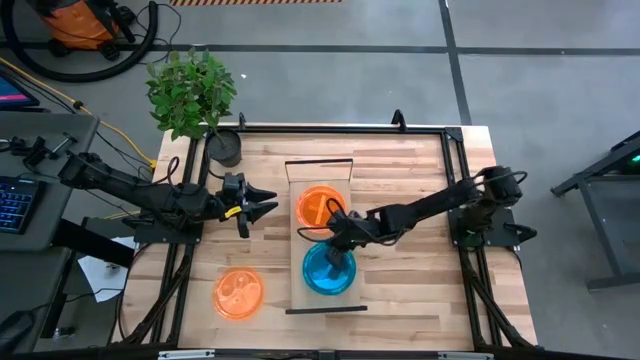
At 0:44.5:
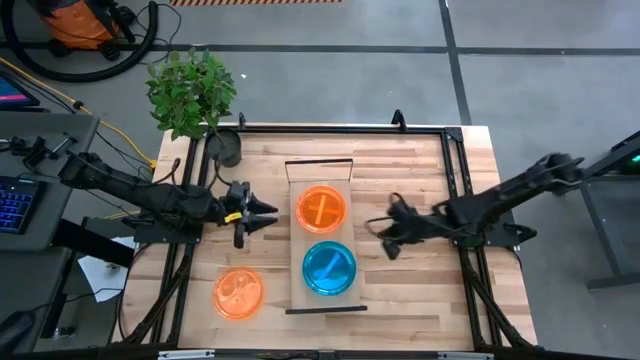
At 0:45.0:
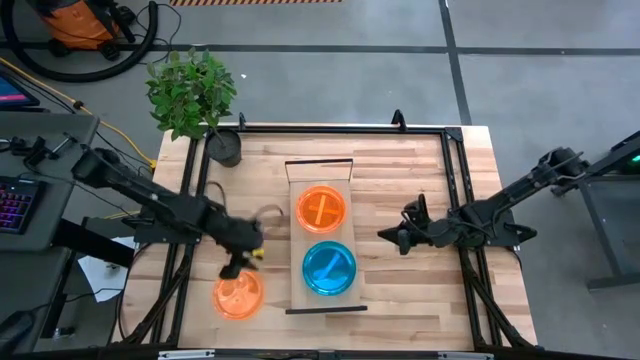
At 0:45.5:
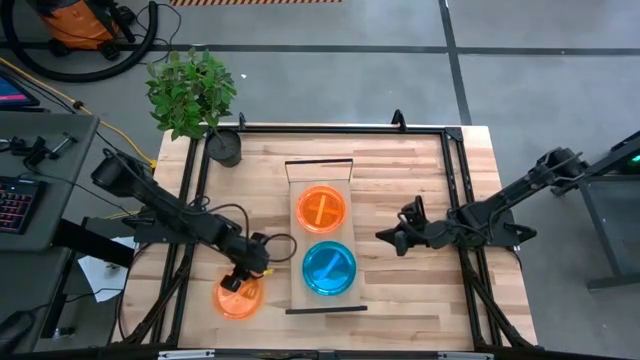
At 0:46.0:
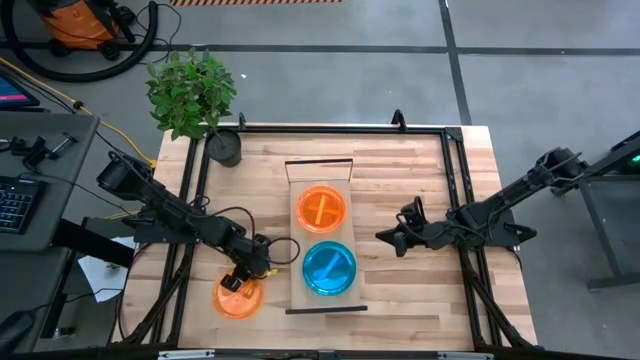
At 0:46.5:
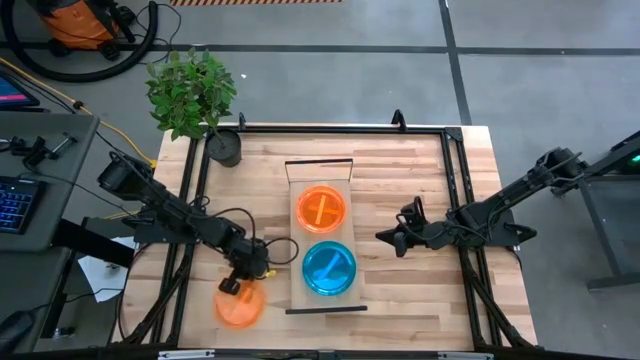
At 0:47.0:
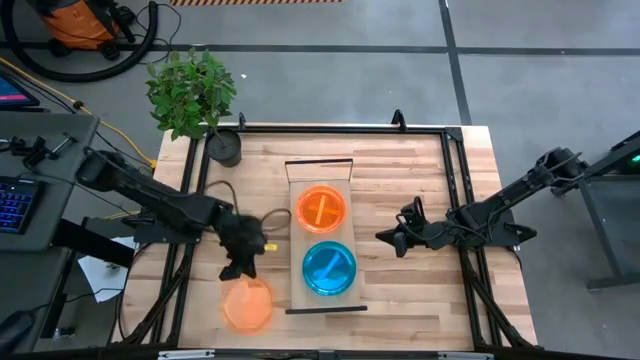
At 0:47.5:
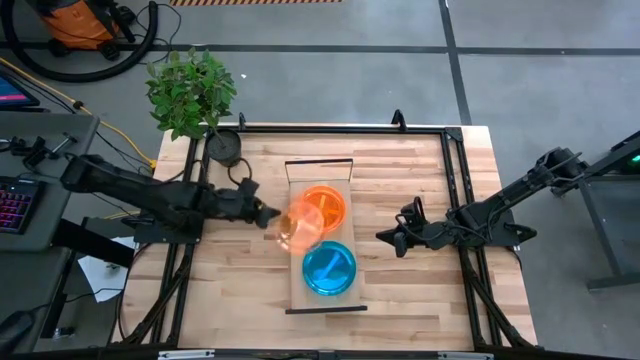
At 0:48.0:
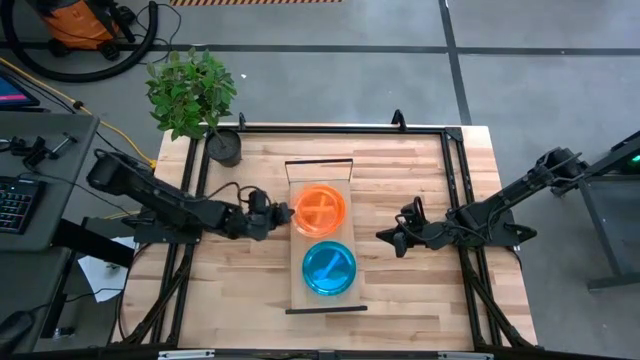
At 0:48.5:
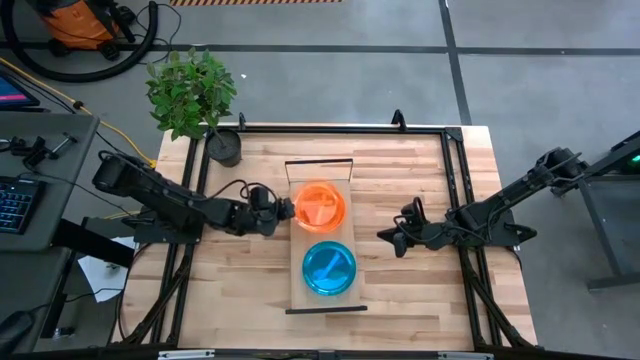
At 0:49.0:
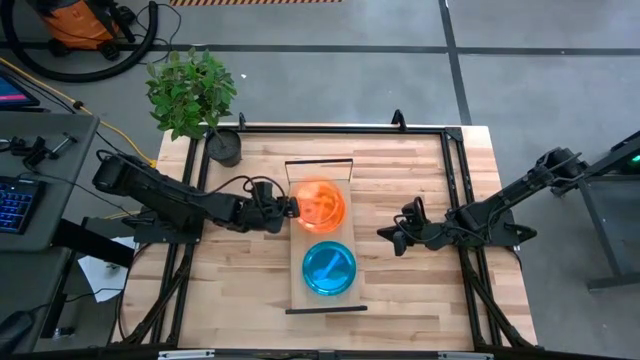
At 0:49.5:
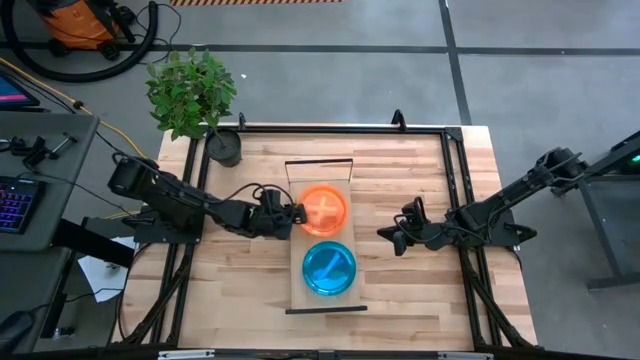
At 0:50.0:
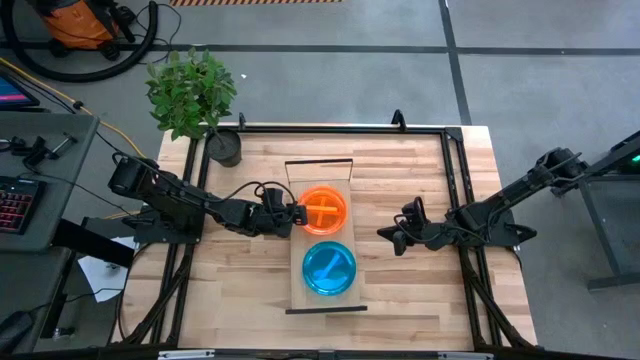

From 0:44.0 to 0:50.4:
Task: Place and stack plates onto a shelf
Stack the orange plate on the orange transparent plate

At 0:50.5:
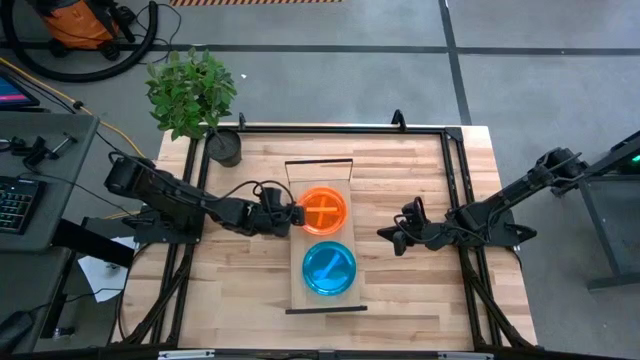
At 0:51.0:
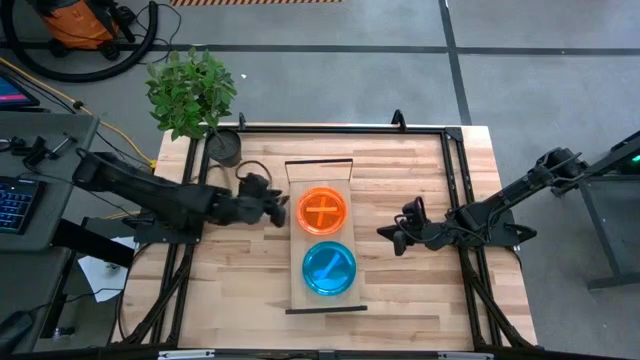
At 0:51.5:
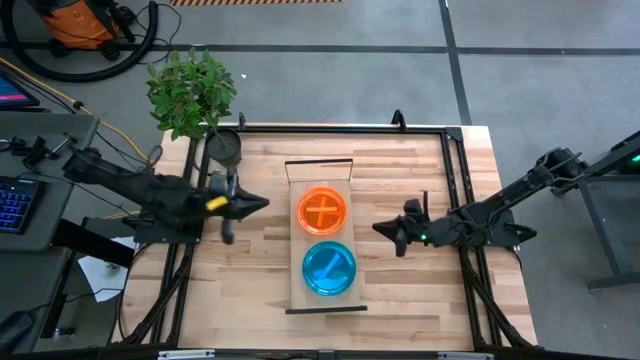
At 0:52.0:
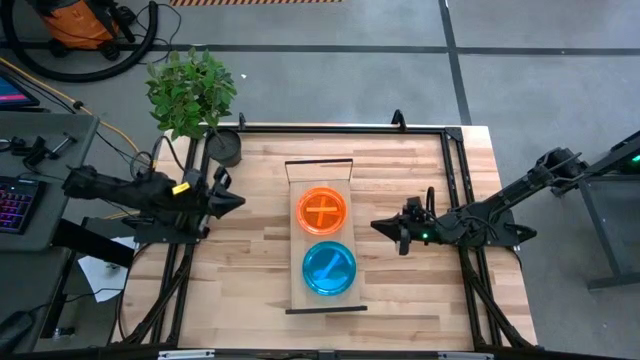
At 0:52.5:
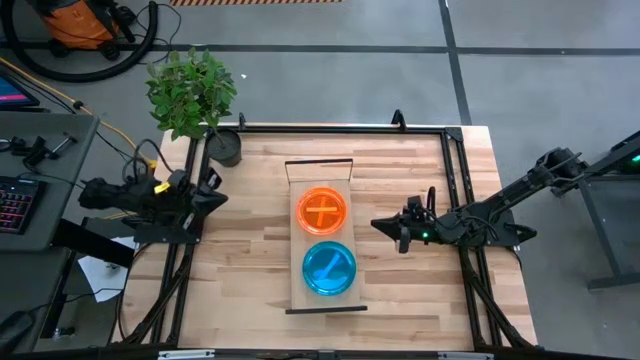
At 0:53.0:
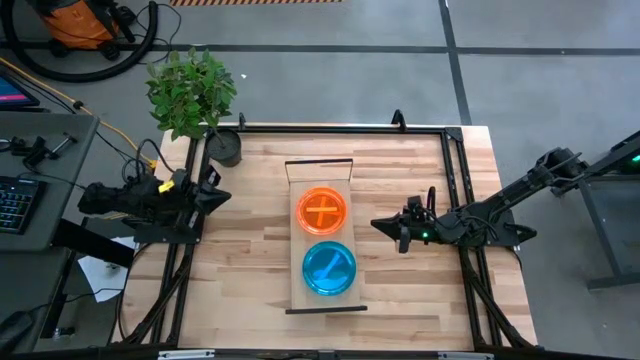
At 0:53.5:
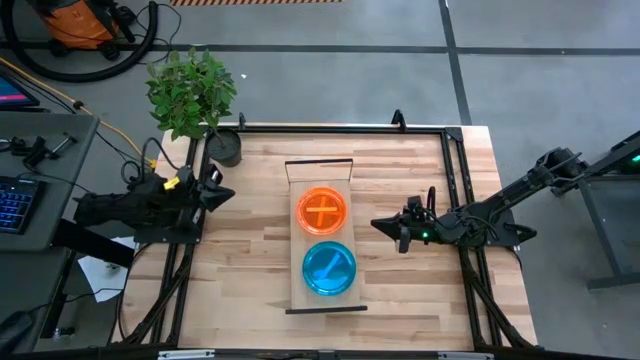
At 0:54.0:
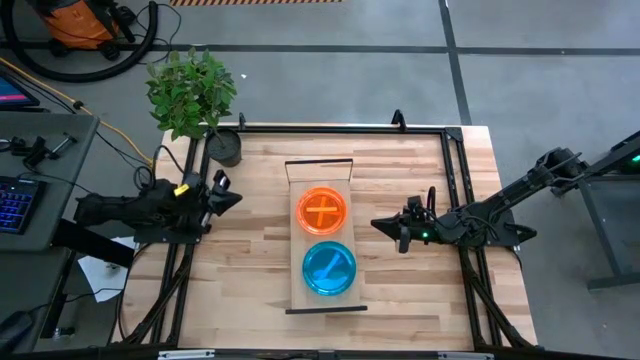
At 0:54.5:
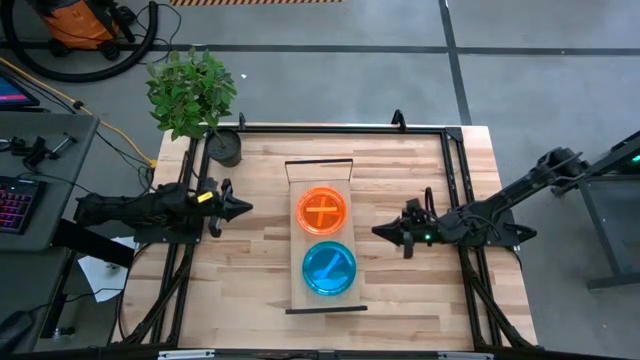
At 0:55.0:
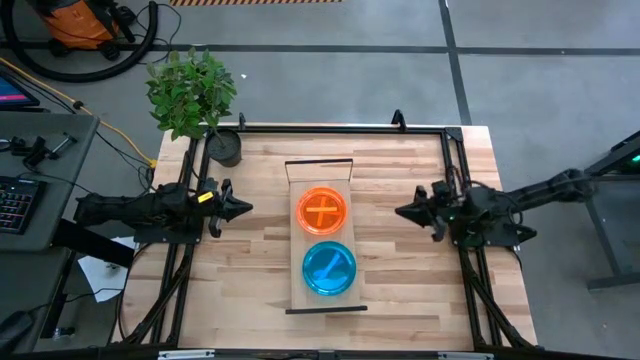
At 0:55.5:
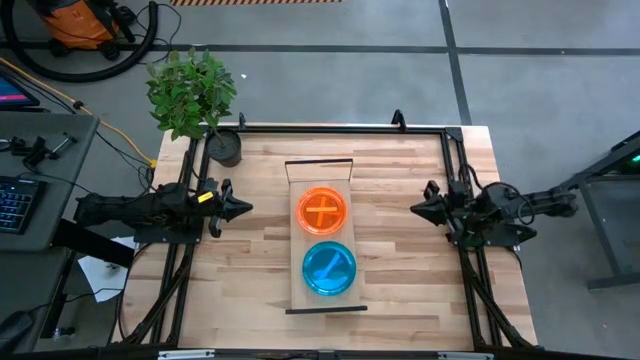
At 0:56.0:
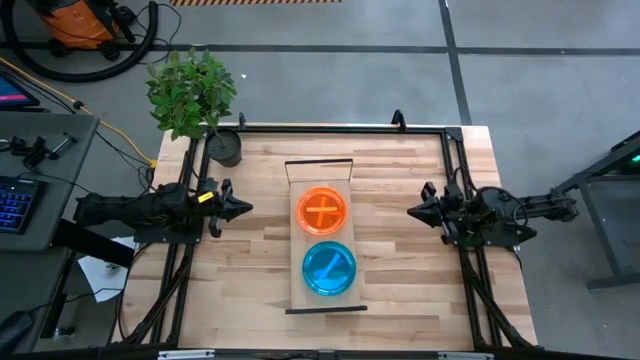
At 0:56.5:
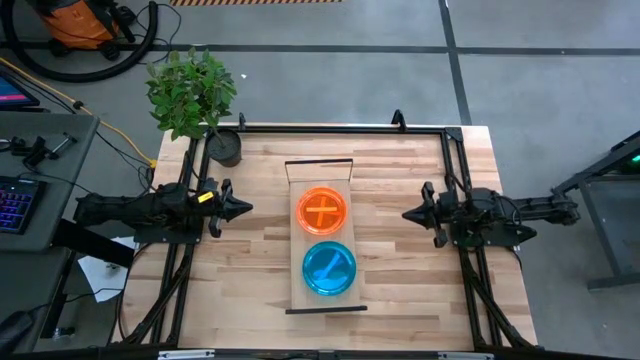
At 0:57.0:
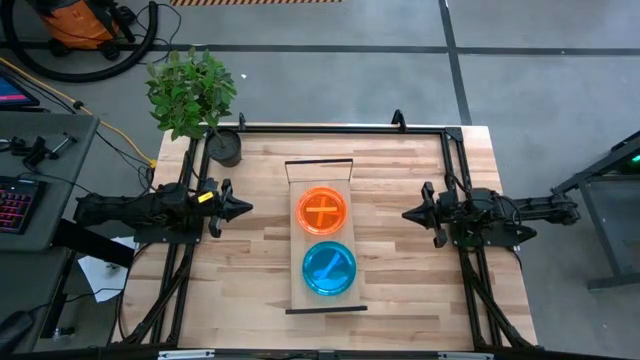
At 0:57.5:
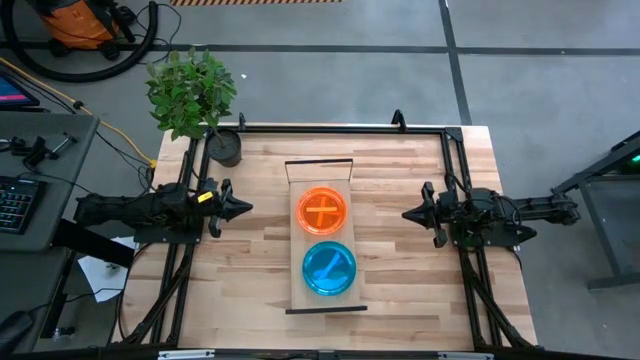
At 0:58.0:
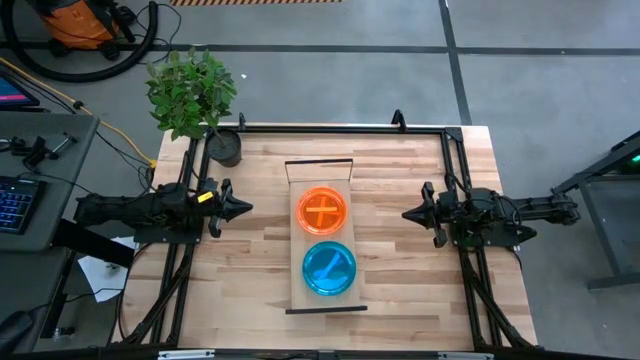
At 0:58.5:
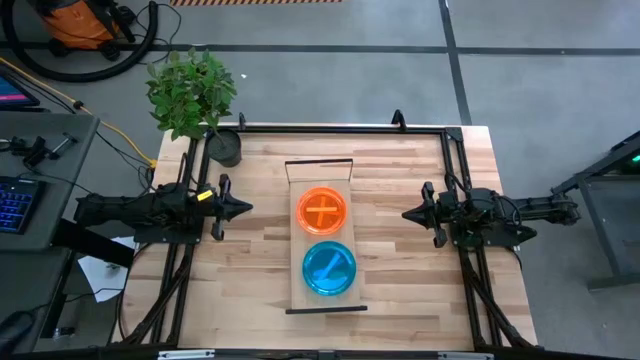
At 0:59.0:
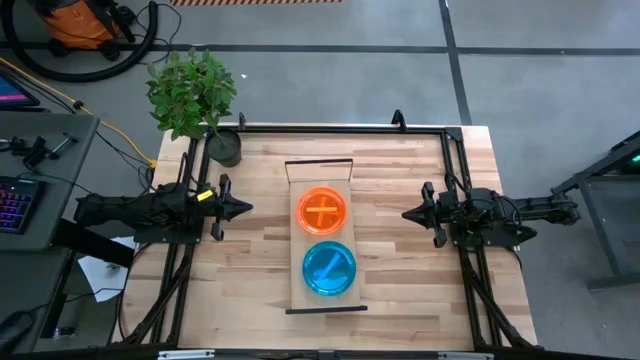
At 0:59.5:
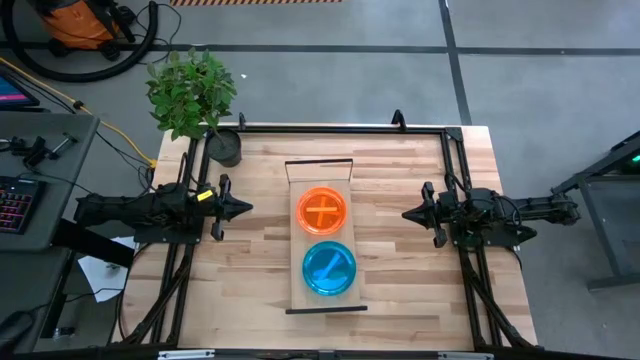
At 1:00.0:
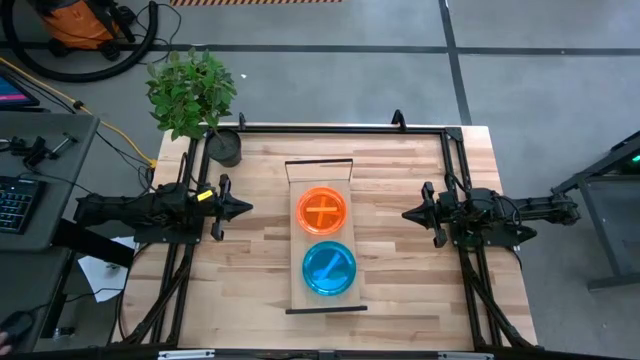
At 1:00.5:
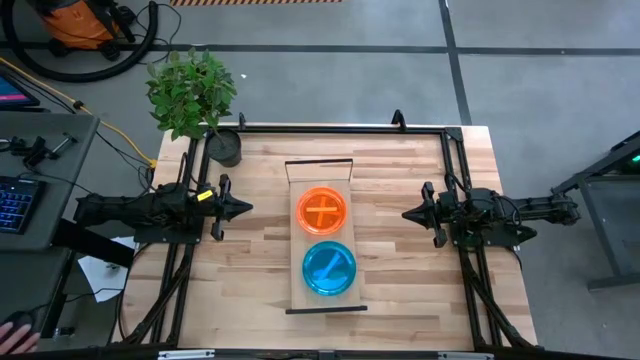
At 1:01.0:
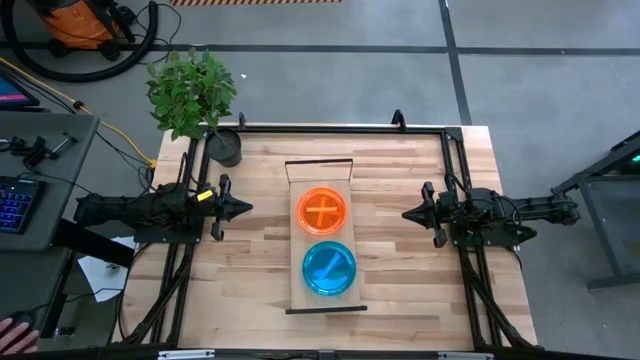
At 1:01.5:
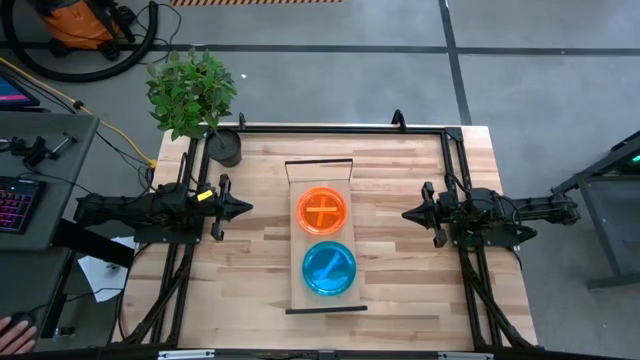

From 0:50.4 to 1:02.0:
Return to home position

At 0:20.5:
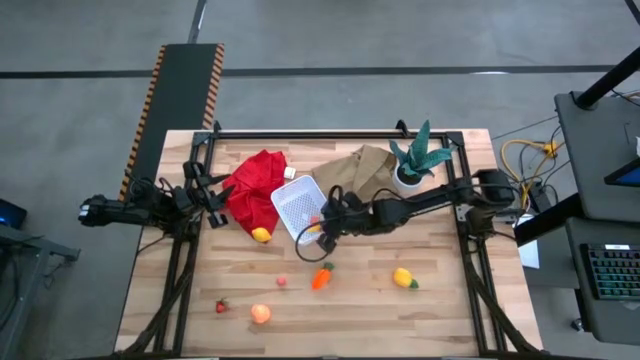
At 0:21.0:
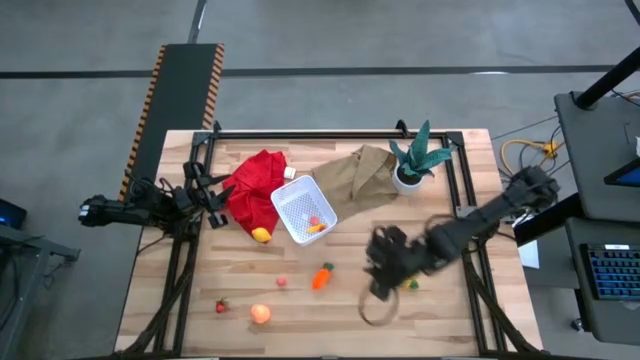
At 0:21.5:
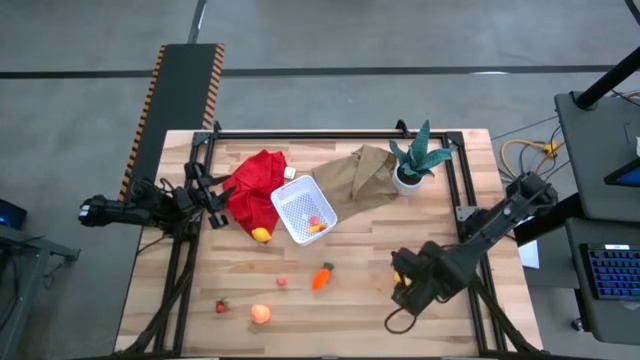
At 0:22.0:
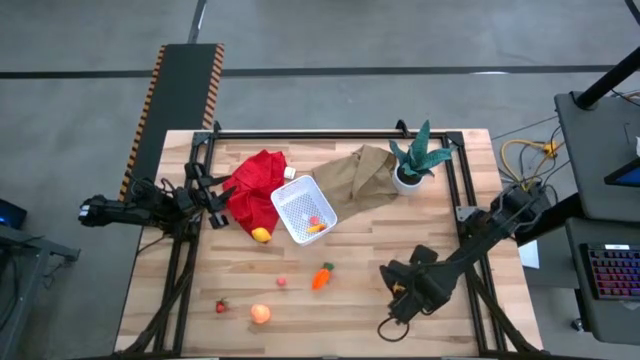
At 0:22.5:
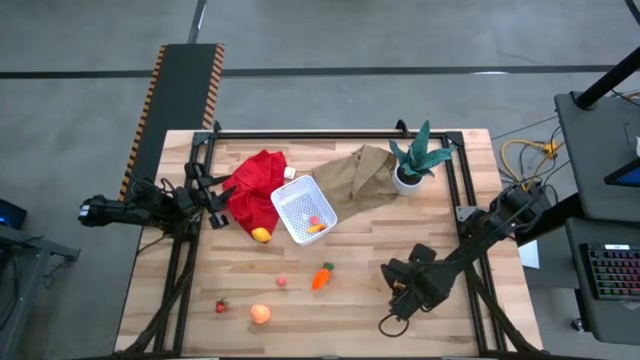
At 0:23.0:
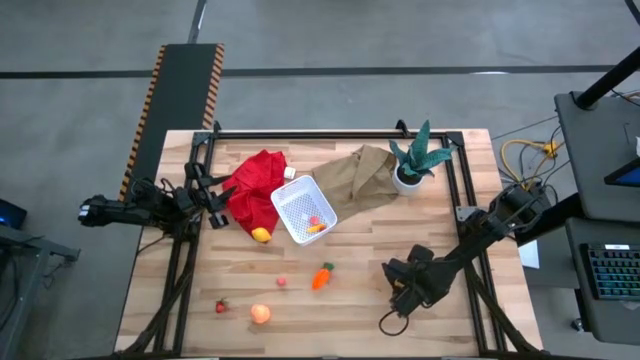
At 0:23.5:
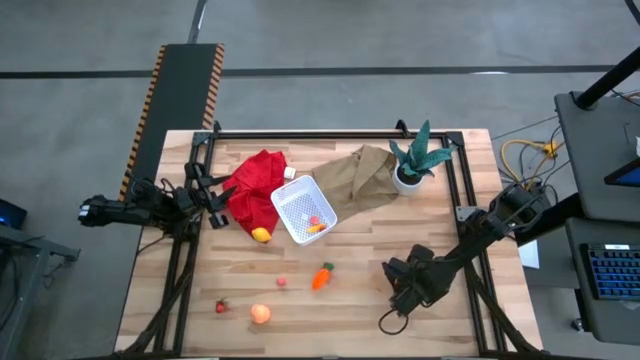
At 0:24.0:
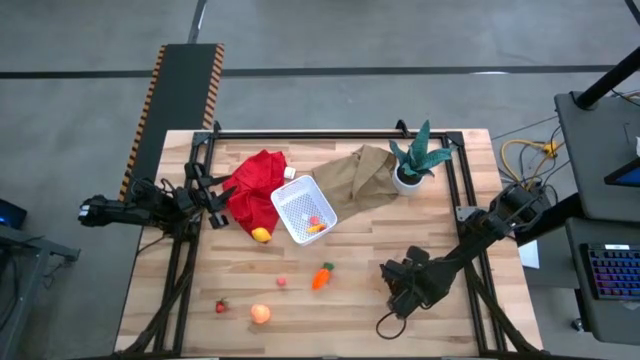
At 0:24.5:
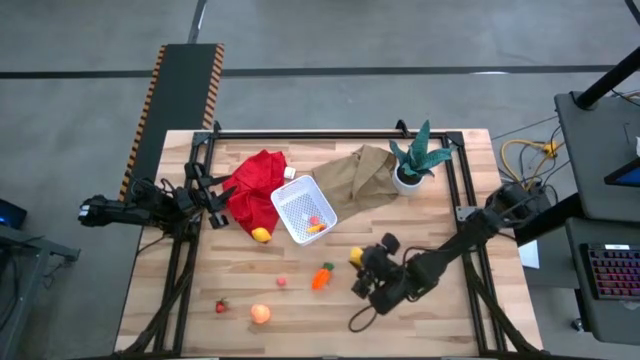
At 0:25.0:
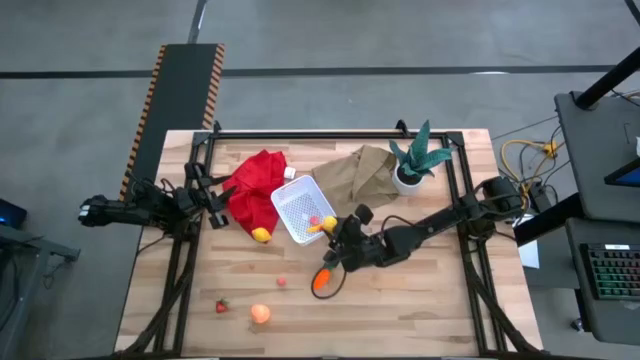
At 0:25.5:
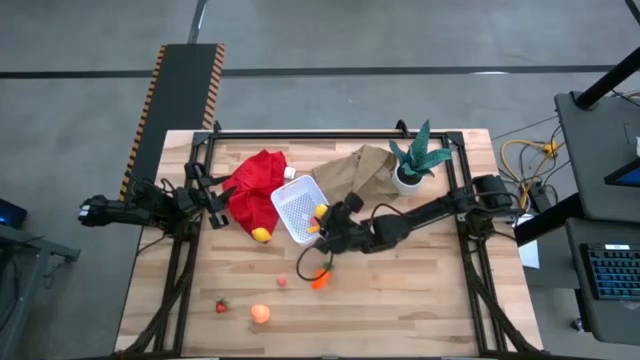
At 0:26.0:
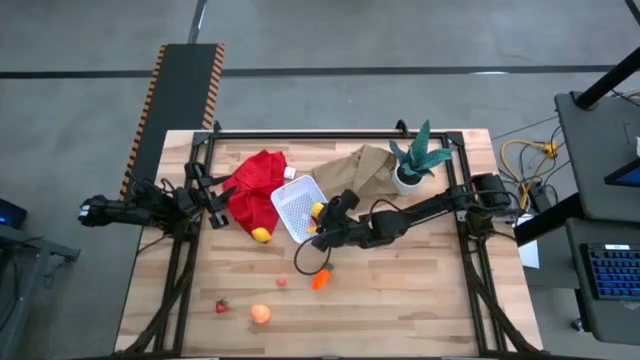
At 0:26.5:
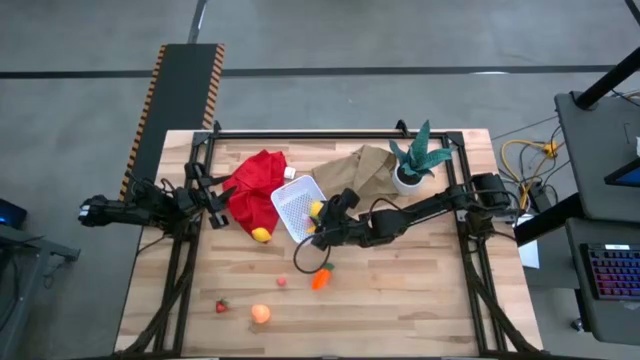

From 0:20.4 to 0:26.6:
Task: Pick and placing Produce into tupperware
Put the toy pineapple into the white bin
